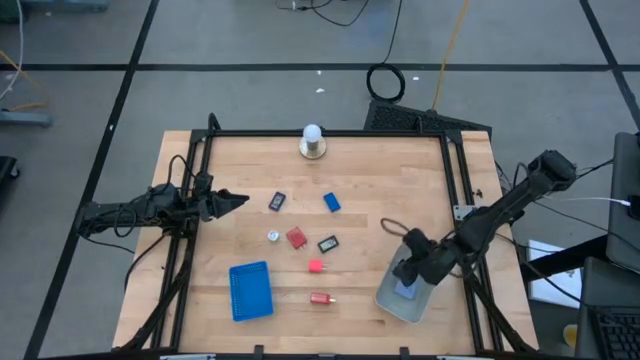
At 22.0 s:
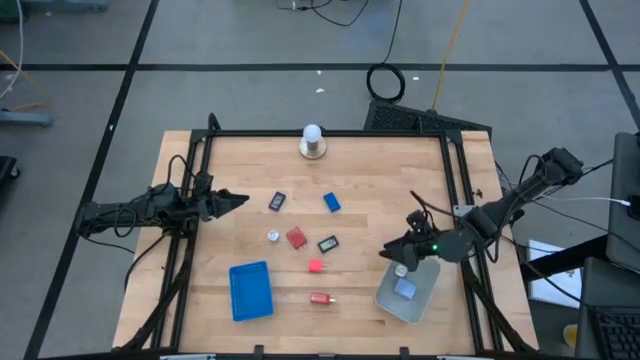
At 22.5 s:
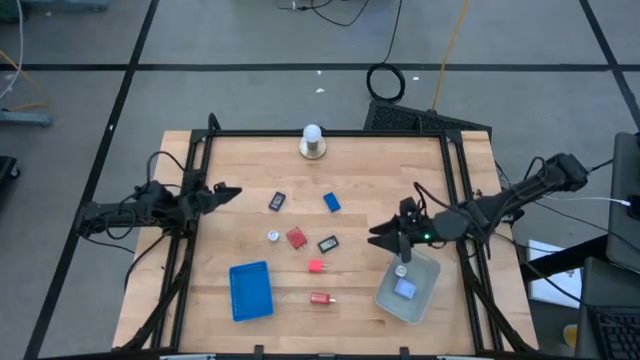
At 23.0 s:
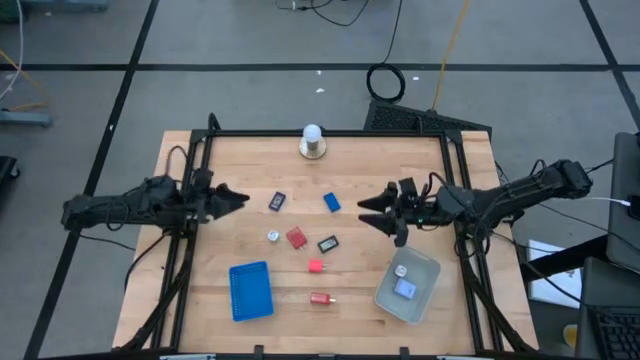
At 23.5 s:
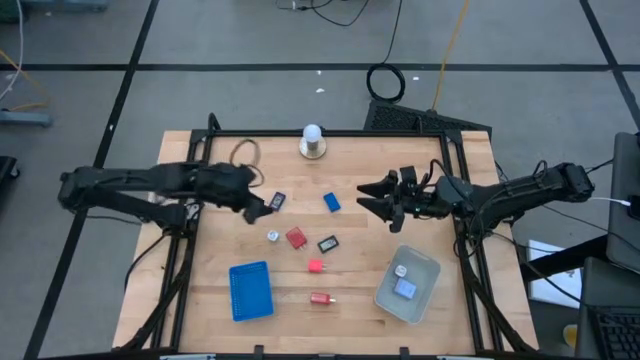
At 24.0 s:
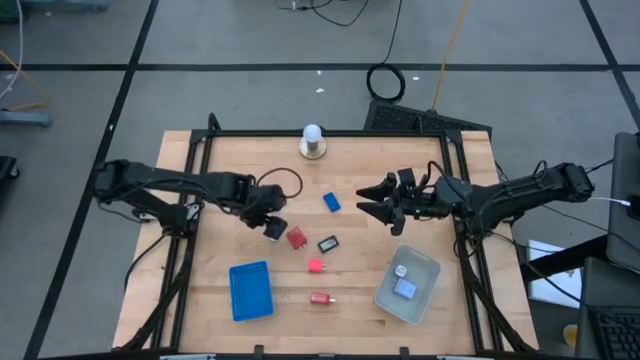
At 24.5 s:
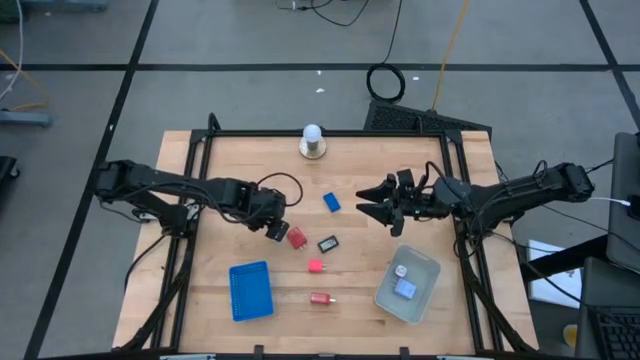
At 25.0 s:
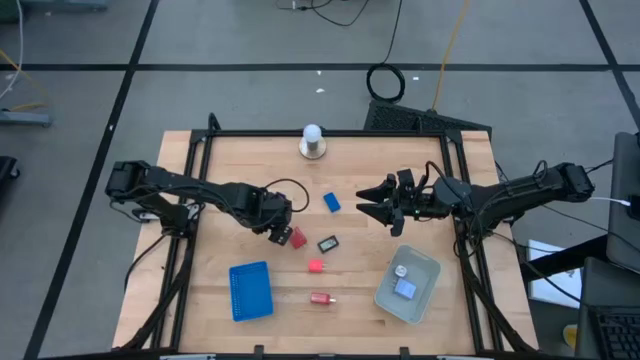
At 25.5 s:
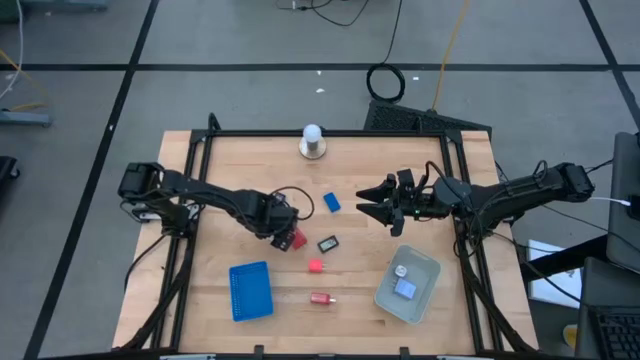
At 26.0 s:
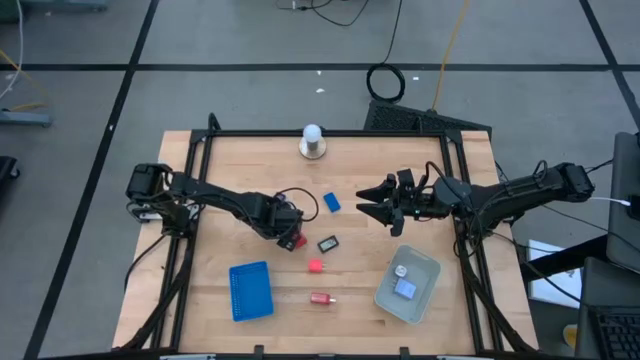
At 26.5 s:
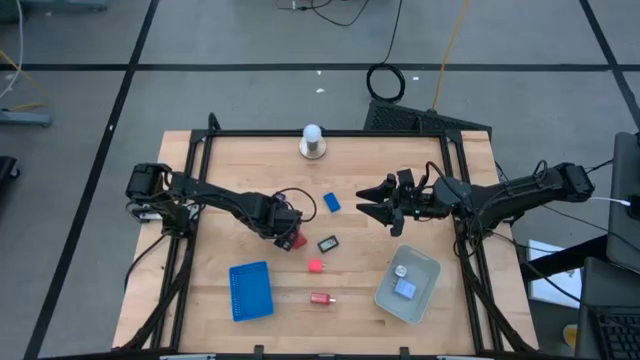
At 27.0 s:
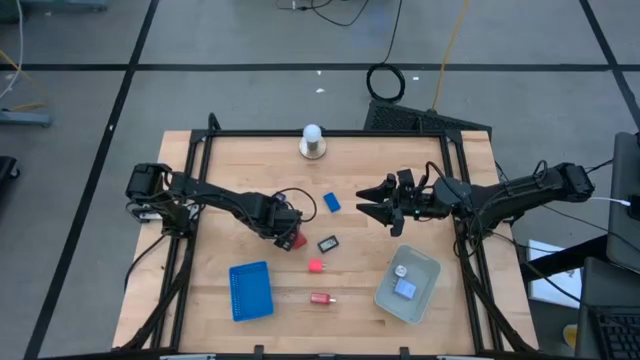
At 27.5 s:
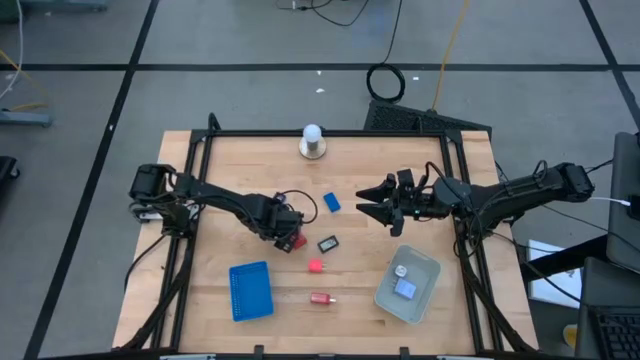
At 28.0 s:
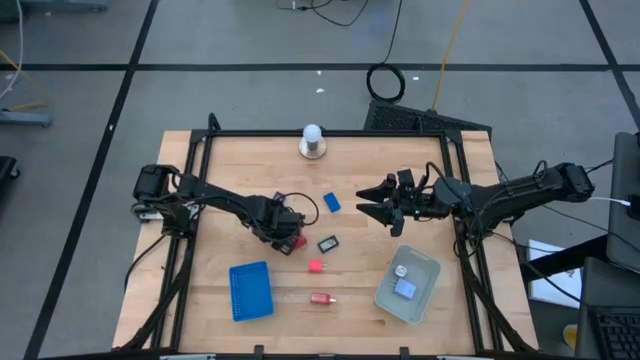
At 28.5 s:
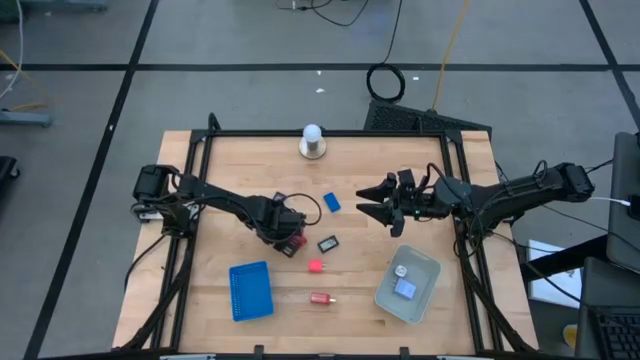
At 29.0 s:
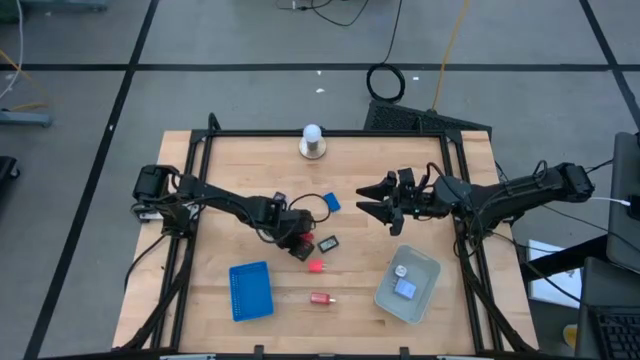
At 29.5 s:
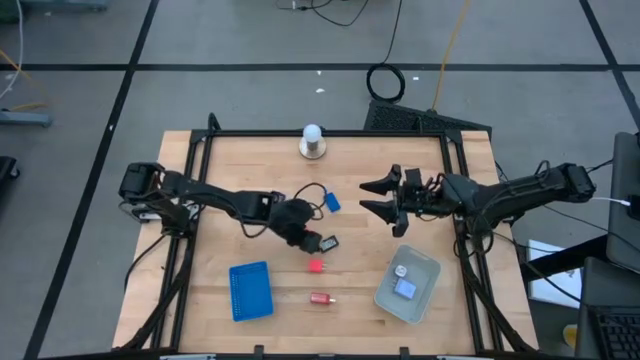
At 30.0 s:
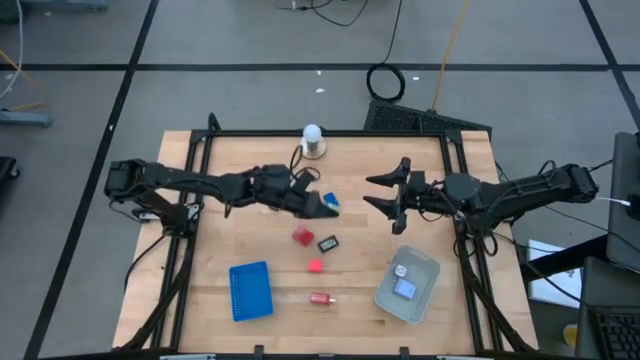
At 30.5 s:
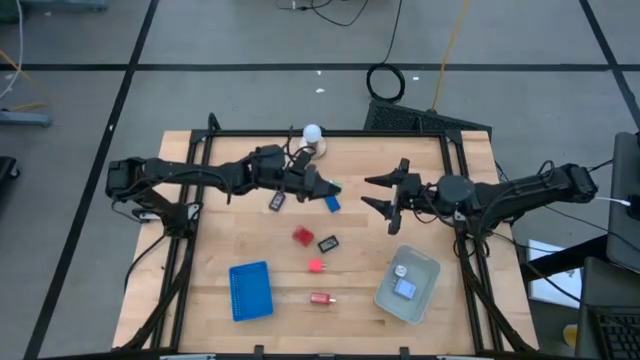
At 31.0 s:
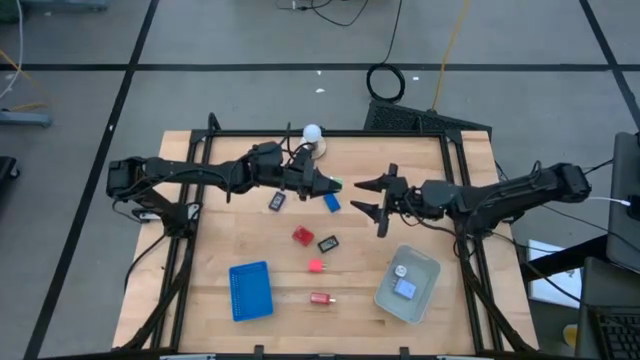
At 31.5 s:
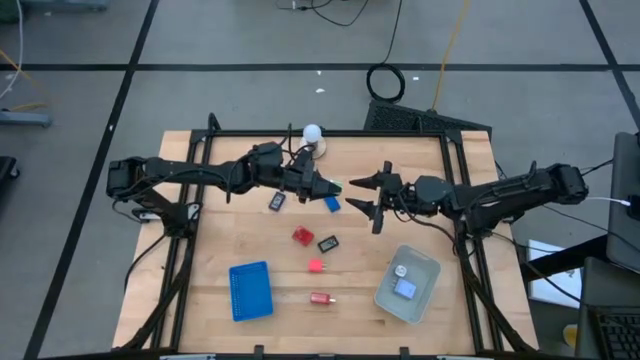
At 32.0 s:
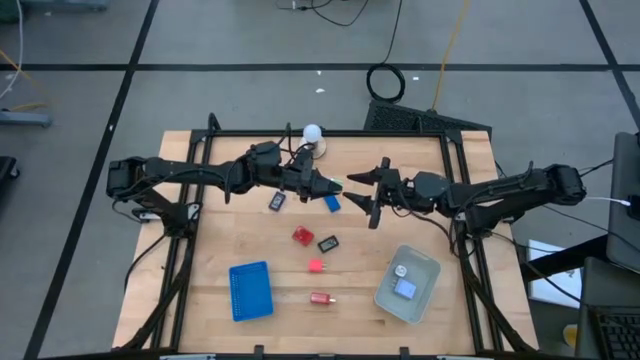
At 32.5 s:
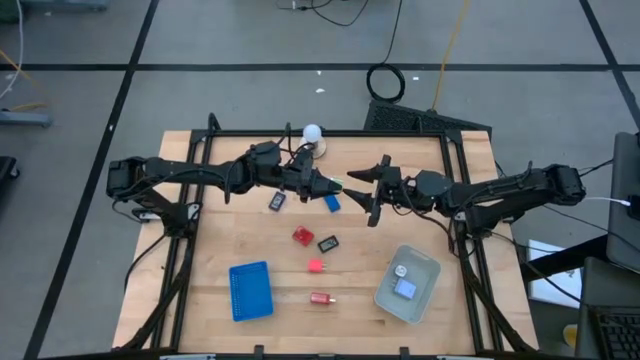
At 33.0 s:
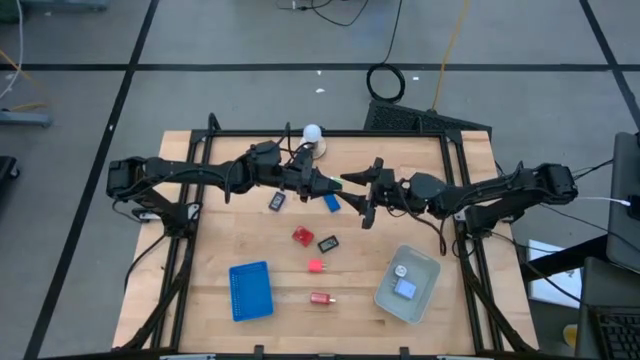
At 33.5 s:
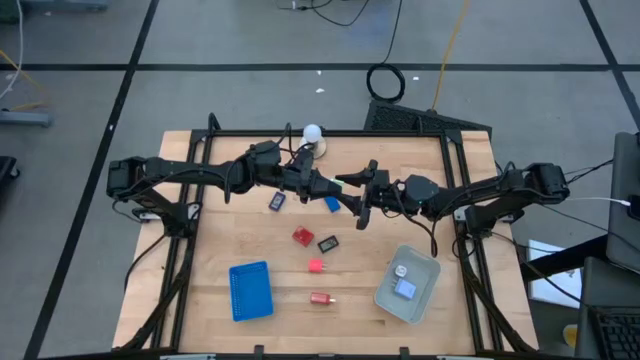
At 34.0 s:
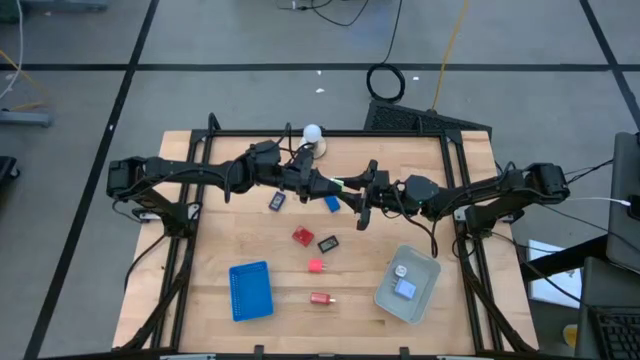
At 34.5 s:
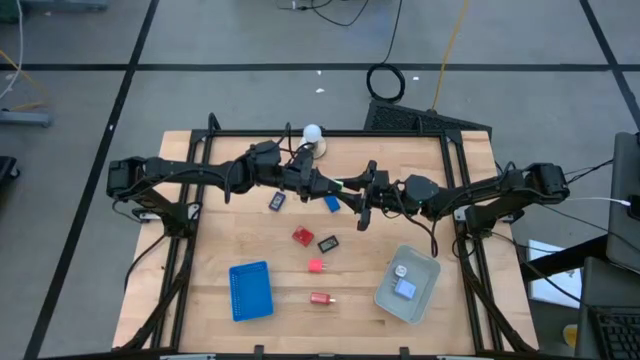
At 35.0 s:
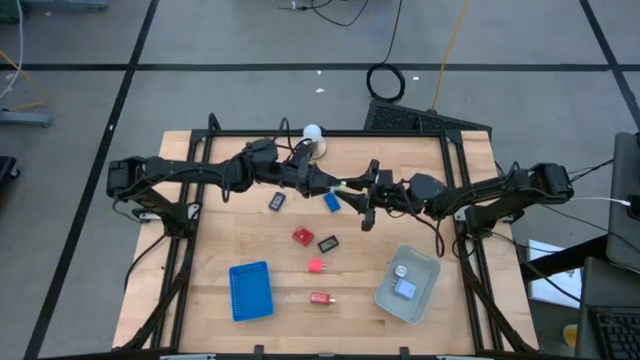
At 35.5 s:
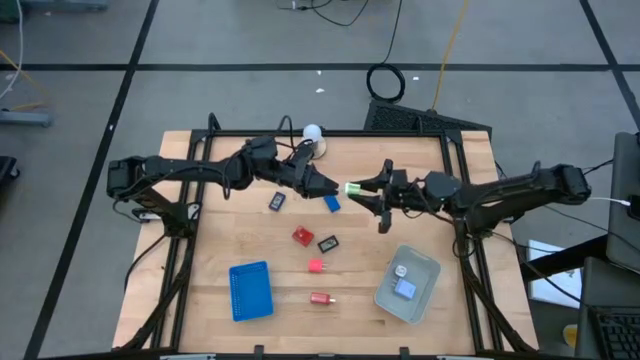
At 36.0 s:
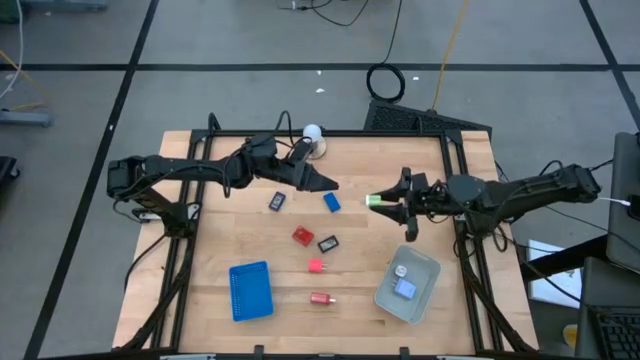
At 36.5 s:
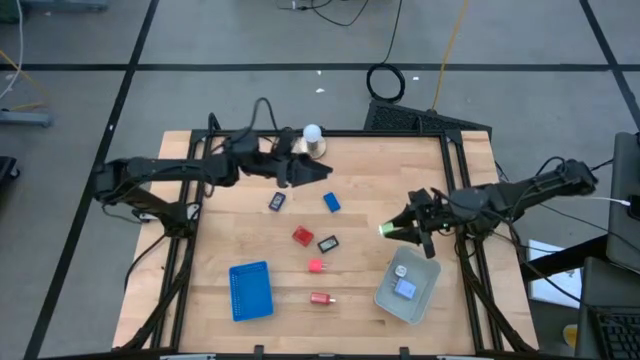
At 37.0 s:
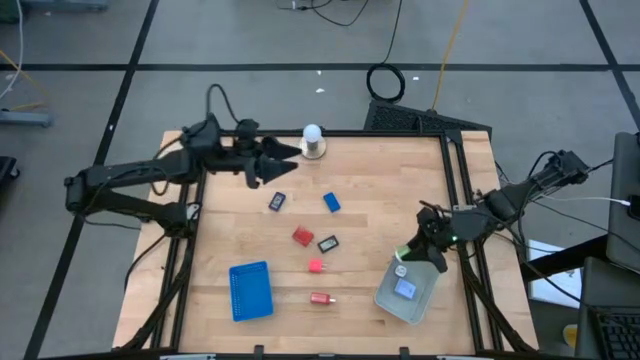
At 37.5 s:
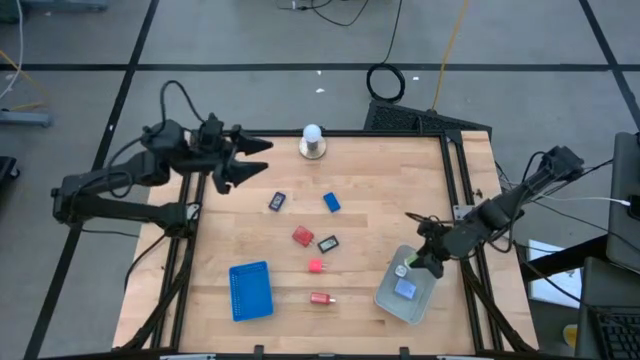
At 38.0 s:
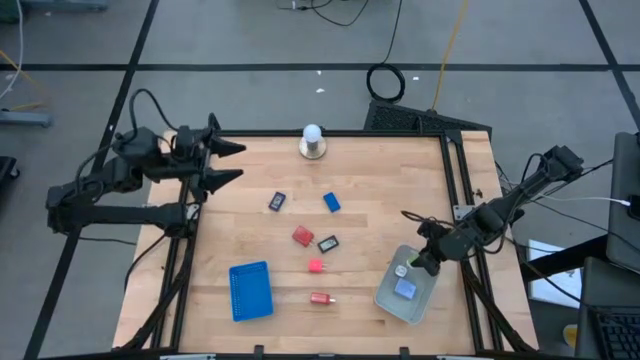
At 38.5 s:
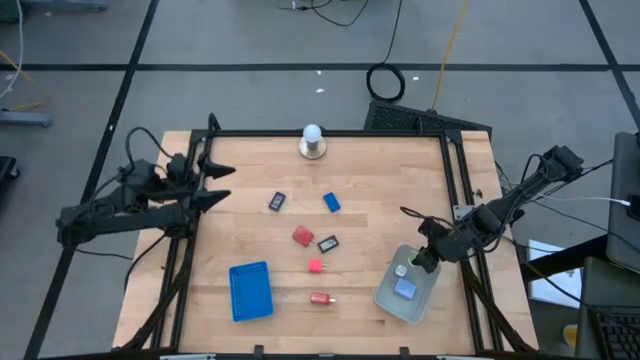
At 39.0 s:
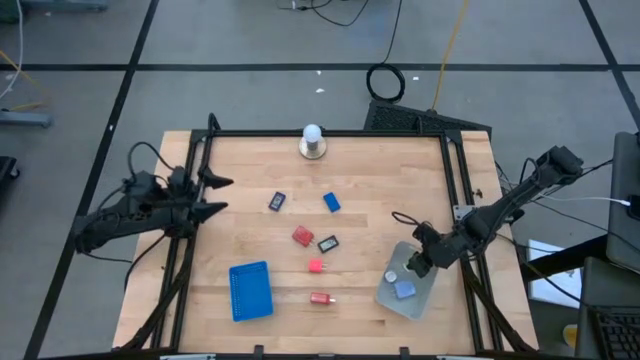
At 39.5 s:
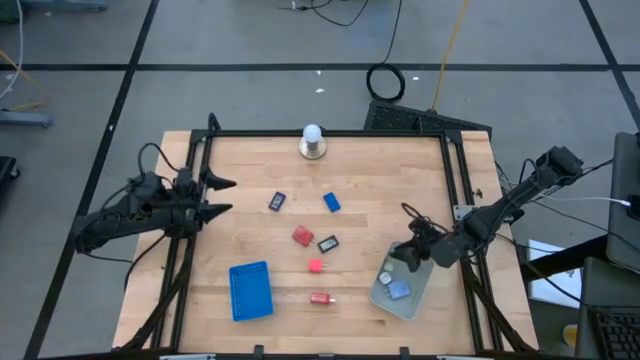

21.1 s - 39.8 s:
Task: Pick & Place Office items
Put the green charger adapter into the gray bin

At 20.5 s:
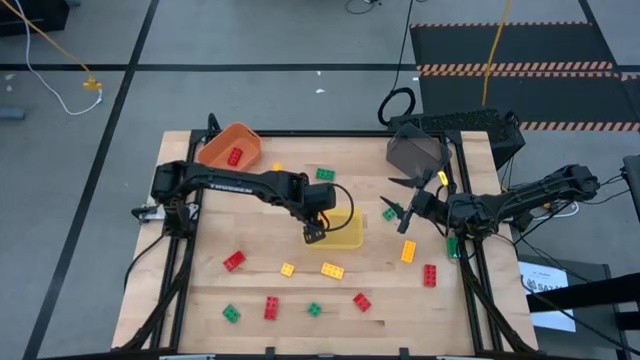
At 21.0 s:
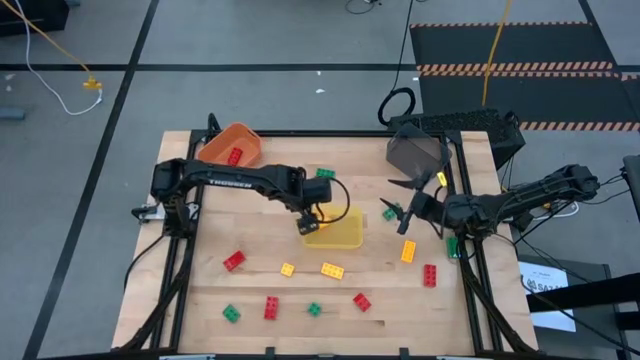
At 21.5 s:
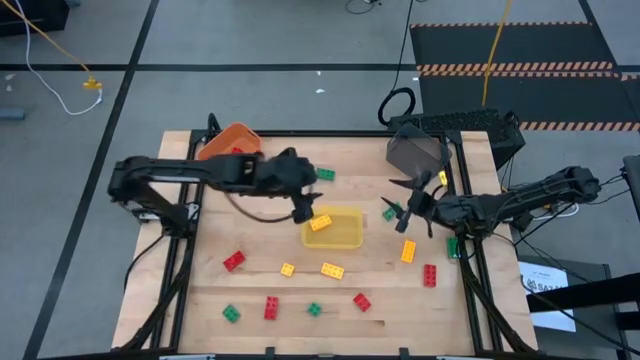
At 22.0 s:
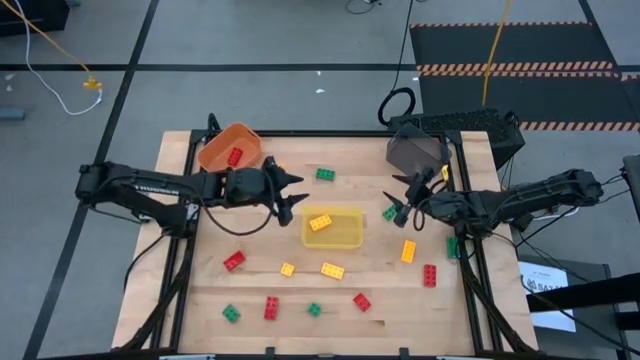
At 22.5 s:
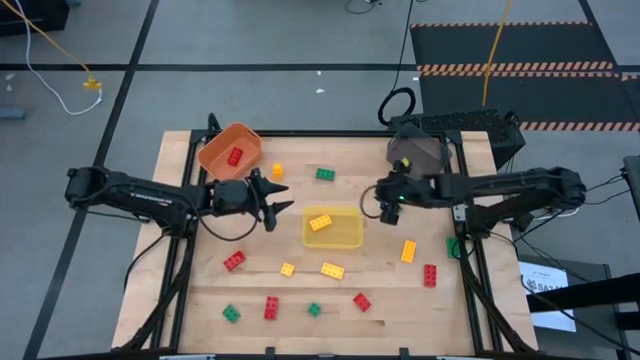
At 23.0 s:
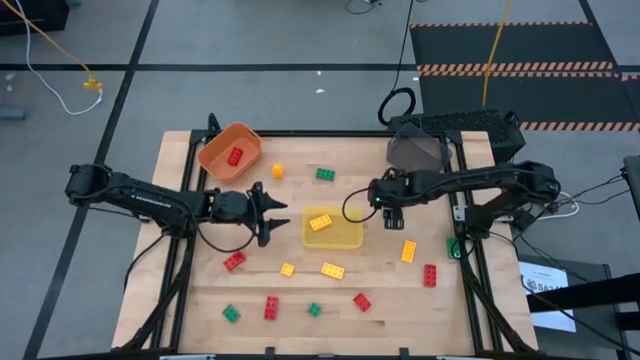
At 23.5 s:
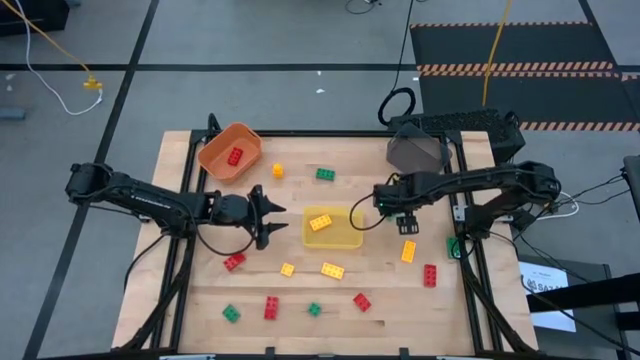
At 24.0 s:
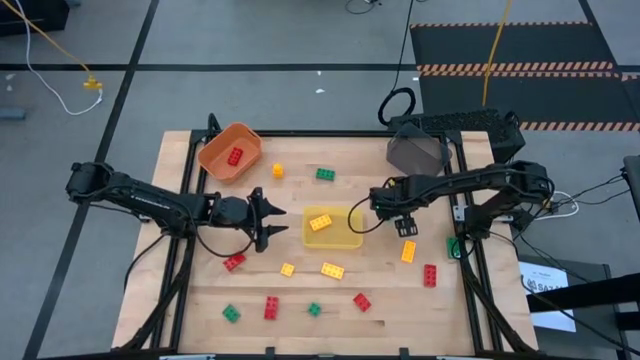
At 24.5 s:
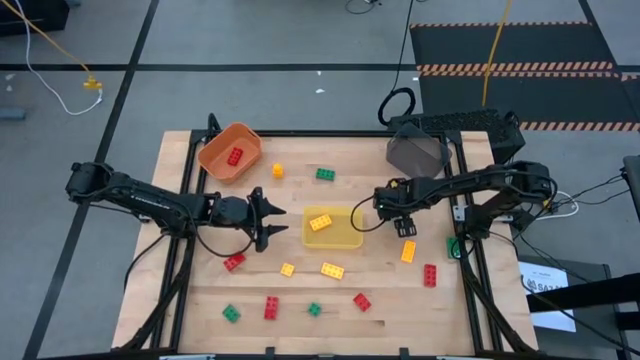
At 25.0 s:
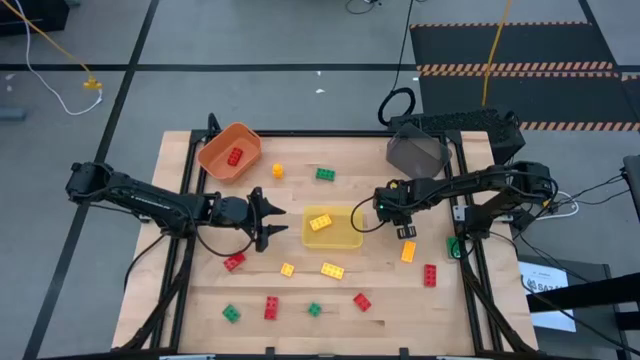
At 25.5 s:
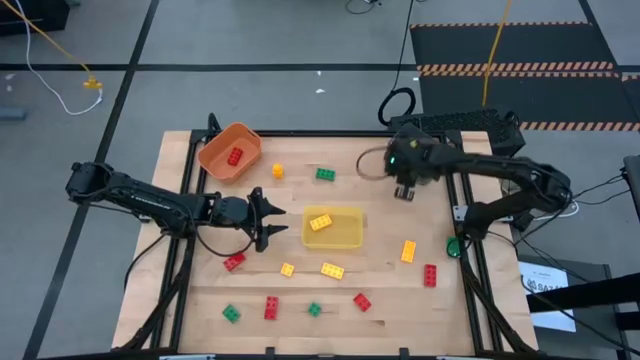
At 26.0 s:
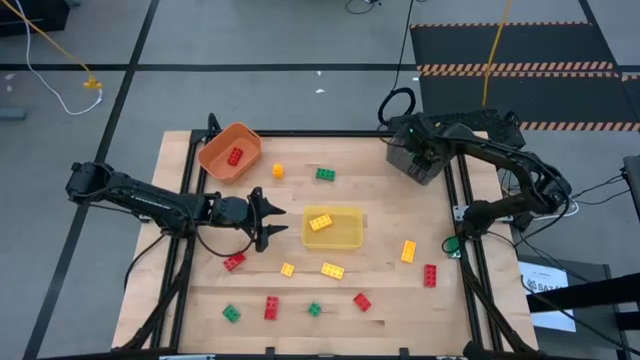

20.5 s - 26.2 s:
Task: Sort & place blocks by color
Put the middle right green 8-stud game piece into the black bin
